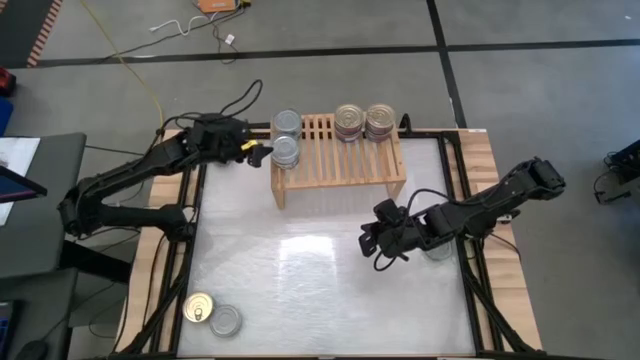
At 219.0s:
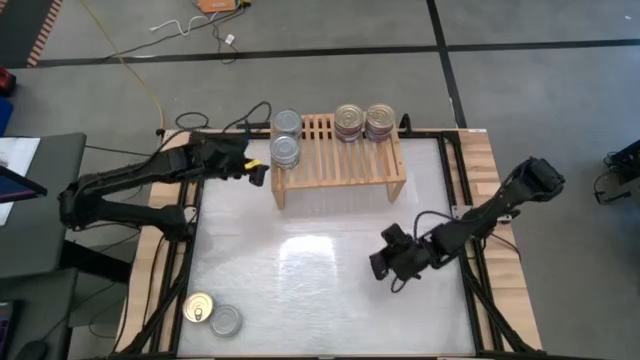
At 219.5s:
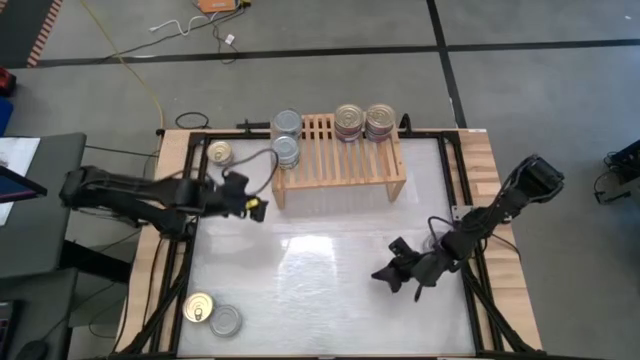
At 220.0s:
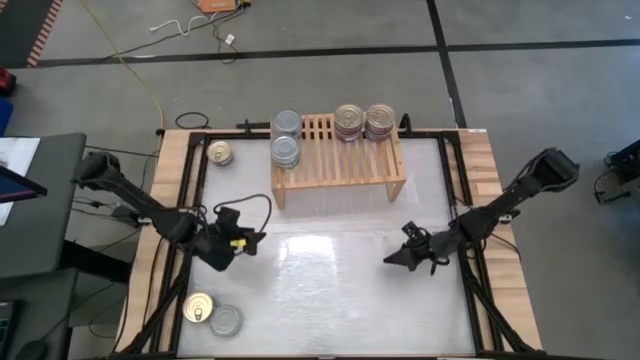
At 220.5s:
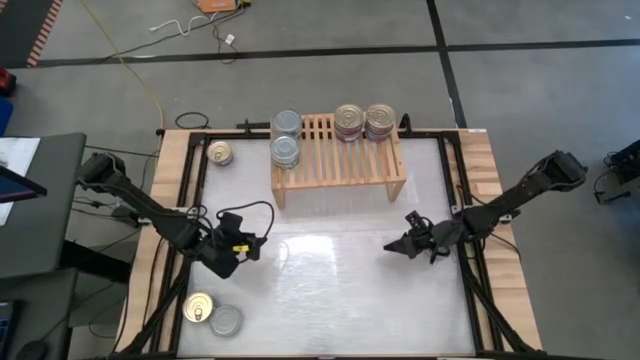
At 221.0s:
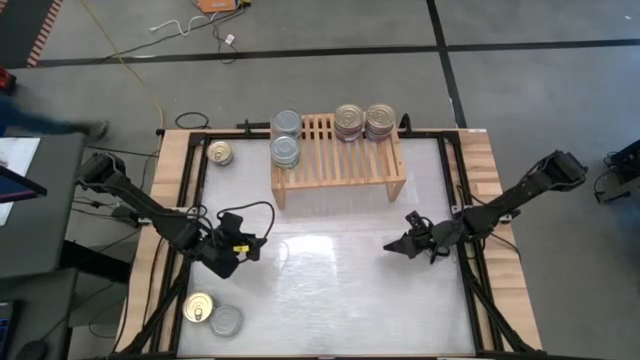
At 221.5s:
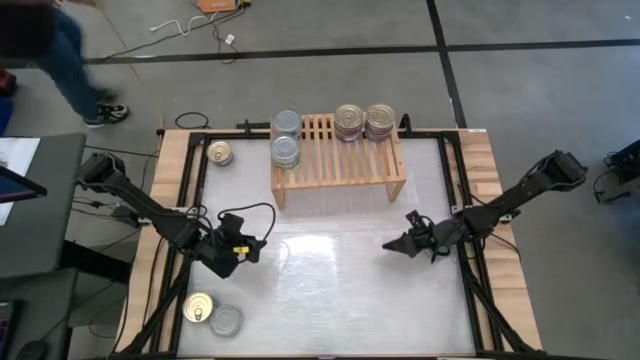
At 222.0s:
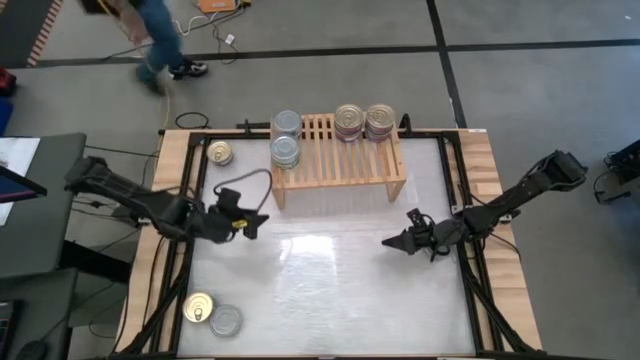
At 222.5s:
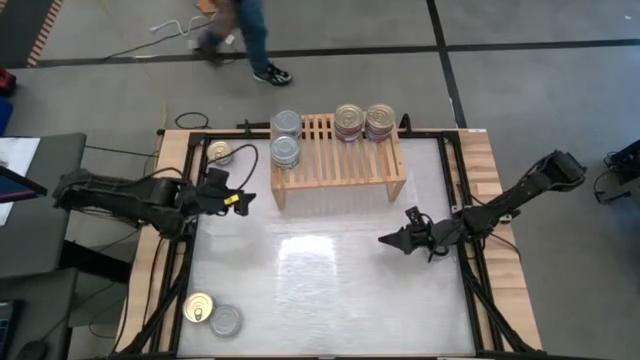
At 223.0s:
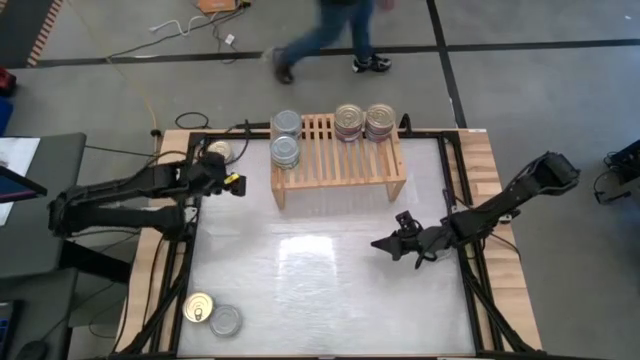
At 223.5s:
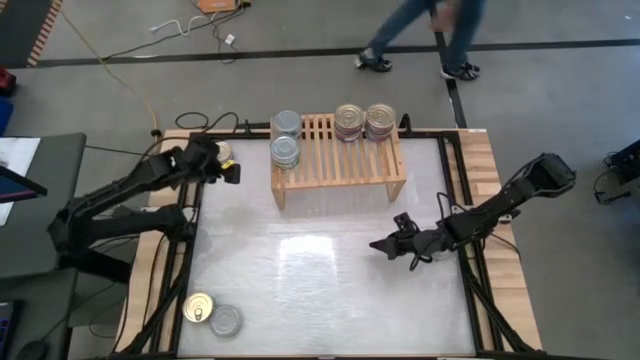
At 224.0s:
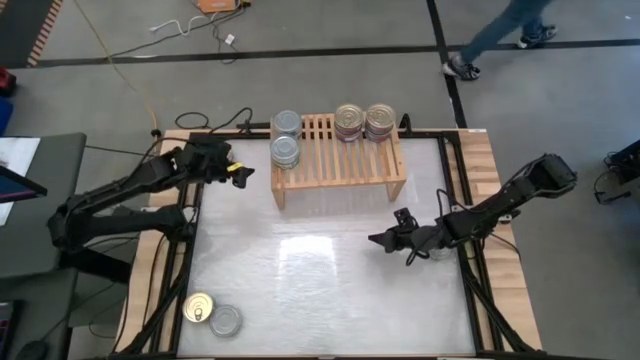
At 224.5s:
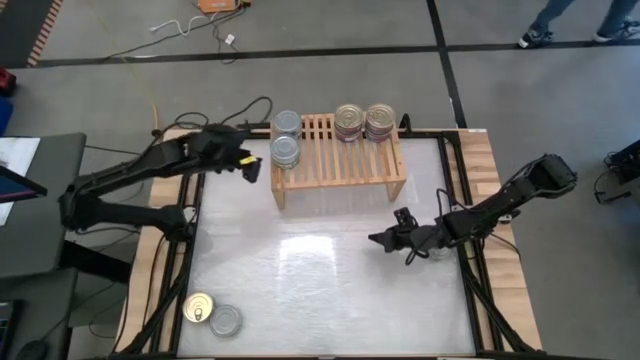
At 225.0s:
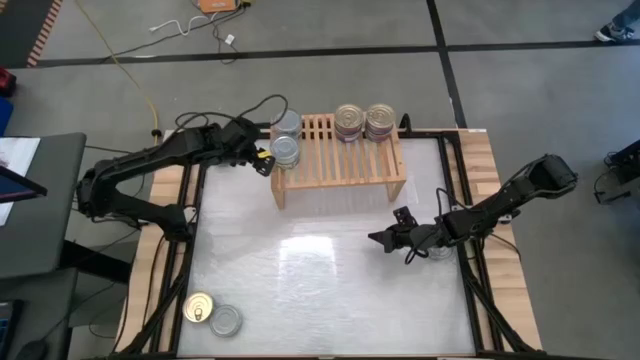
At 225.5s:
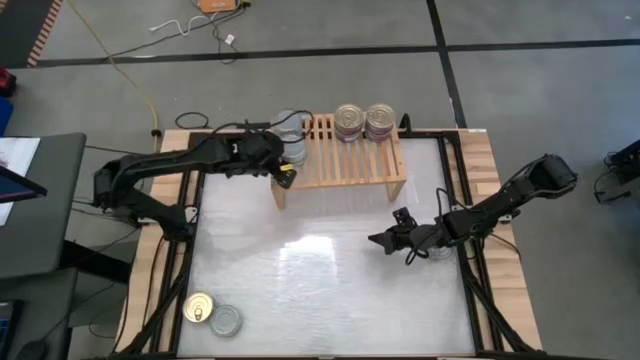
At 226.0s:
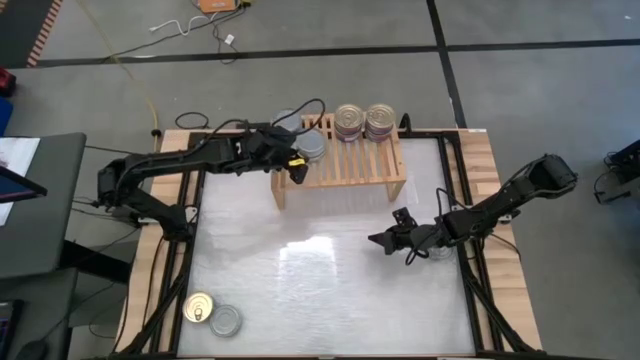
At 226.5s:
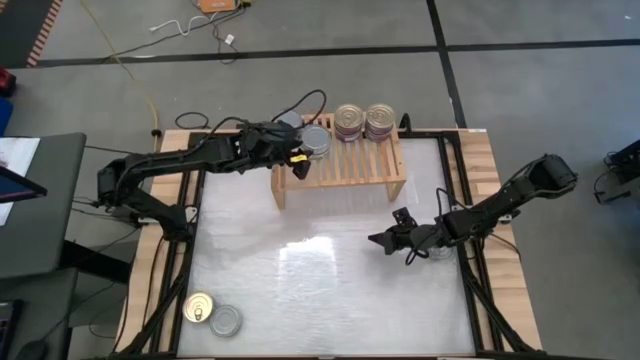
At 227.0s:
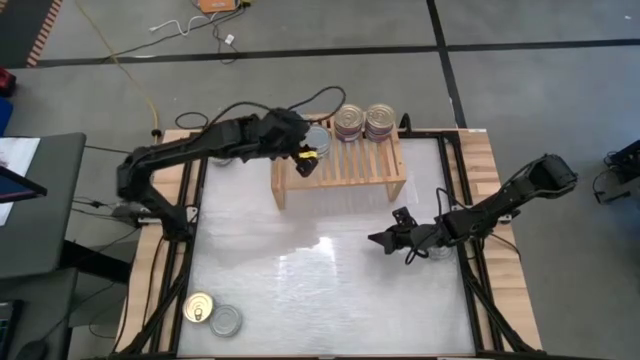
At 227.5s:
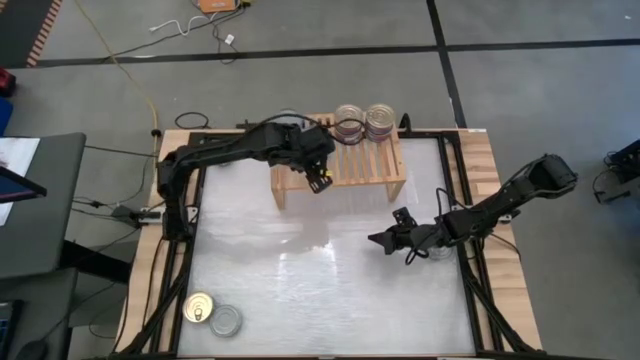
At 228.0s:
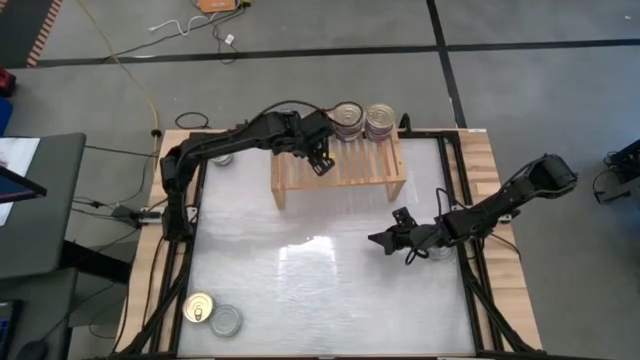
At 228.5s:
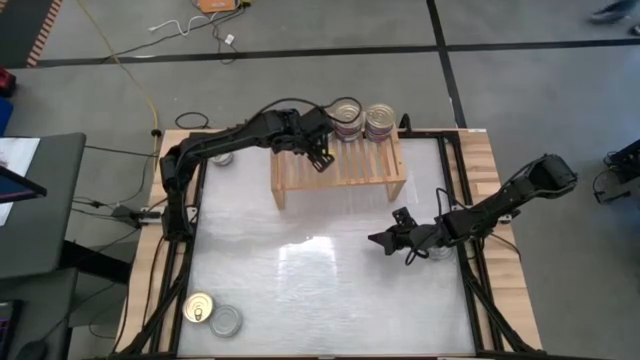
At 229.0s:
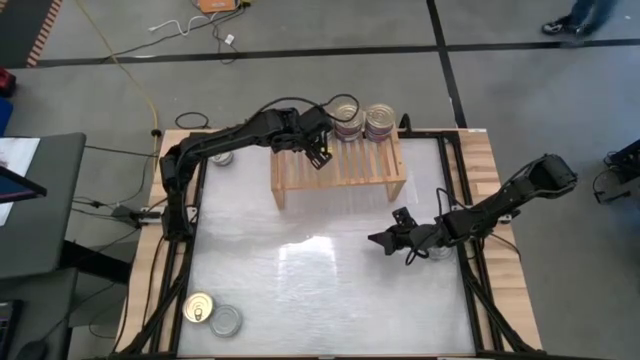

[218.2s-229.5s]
Task: Stack canned seafood by type on shelf
Adjust the green tuna cans

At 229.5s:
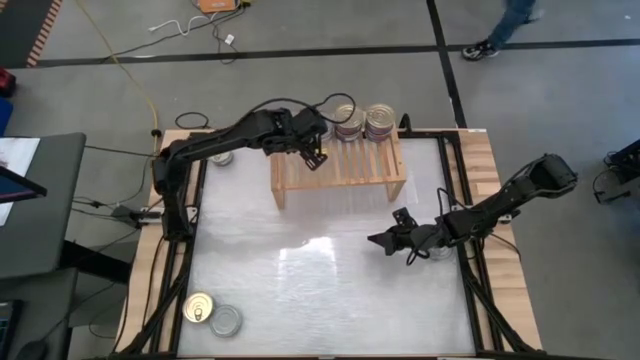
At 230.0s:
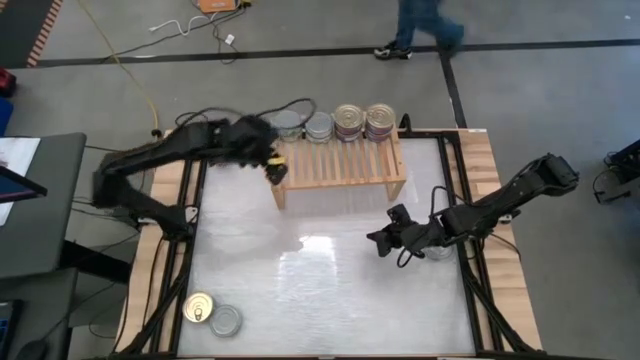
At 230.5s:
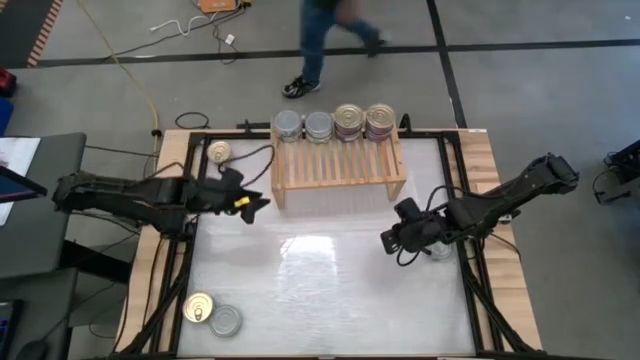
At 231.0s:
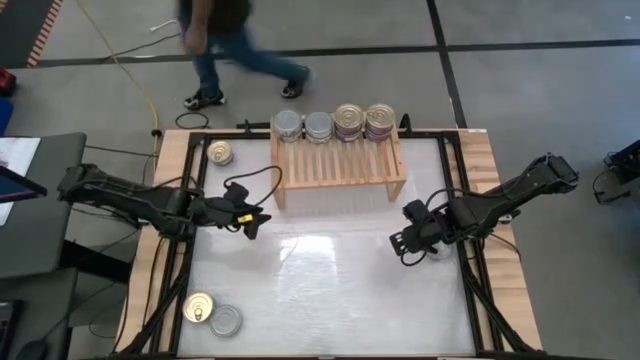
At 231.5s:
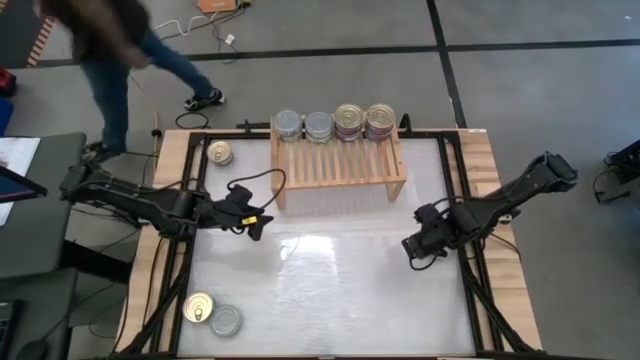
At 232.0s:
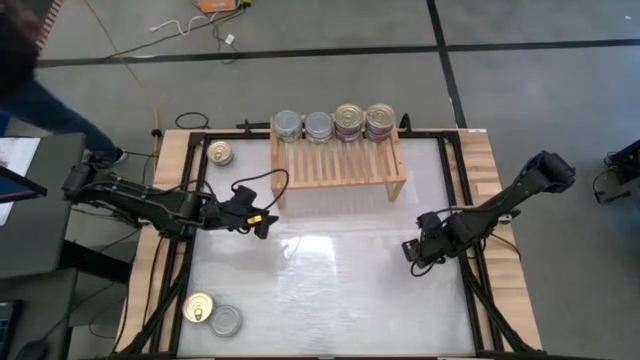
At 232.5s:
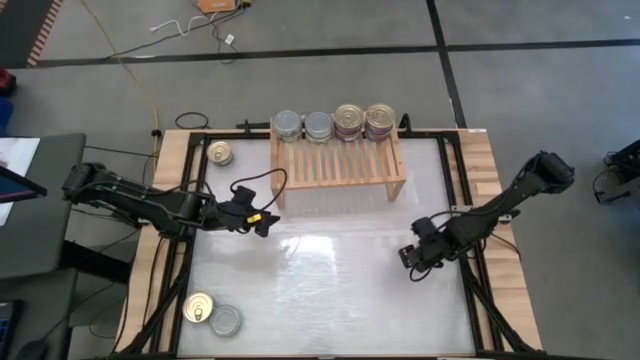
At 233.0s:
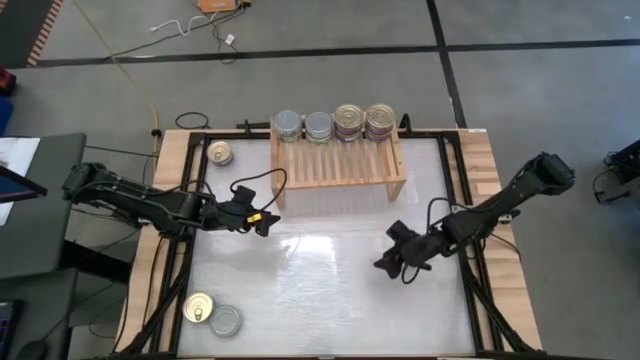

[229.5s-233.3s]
Move the green tuna can to the center of the table

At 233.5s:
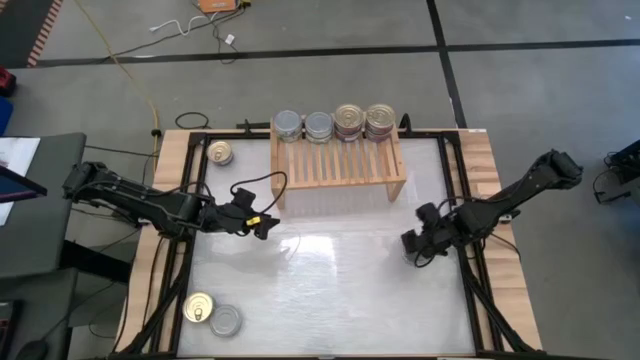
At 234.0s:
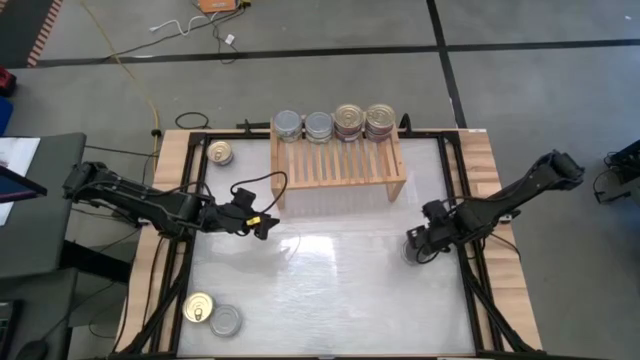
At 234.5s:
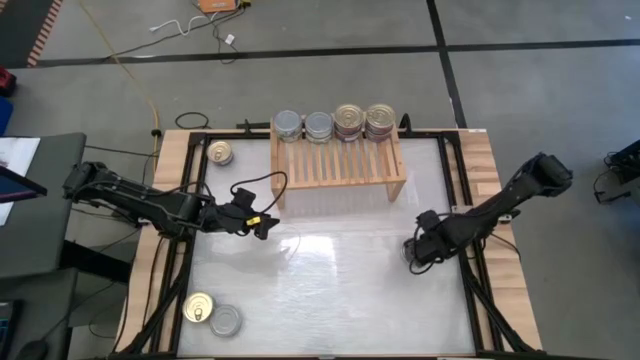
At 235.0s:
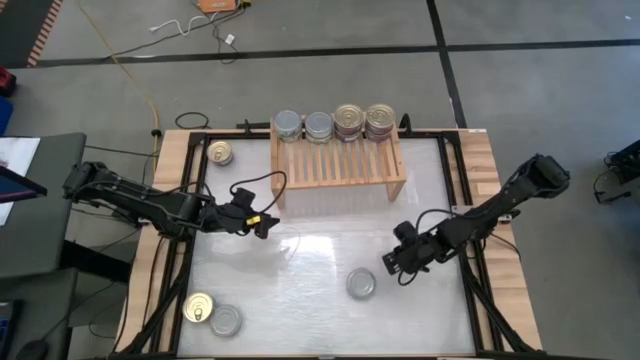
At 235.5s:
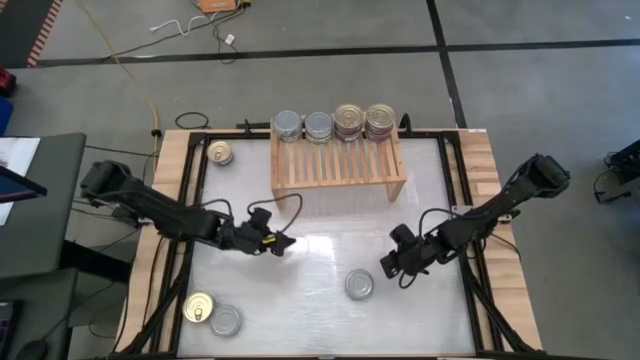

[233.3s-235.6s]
Move the green tuna can to the center of the table

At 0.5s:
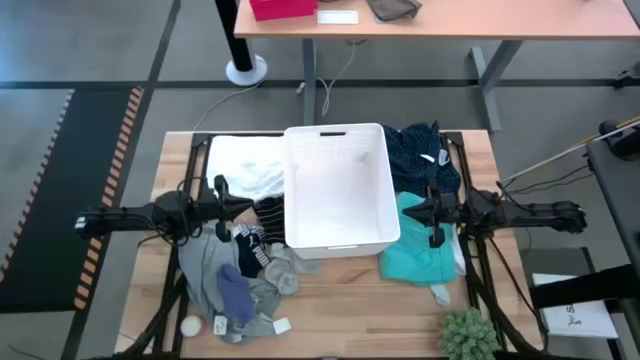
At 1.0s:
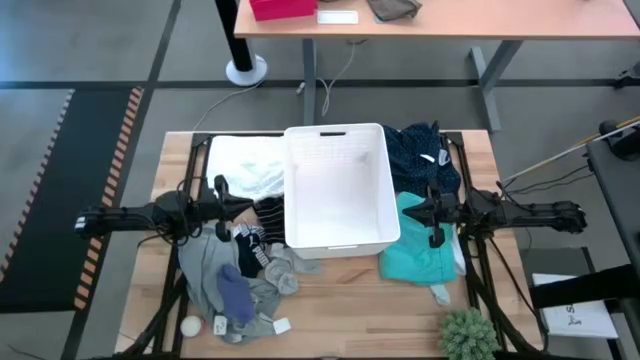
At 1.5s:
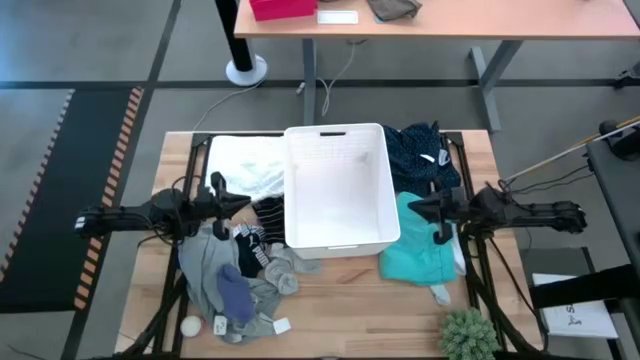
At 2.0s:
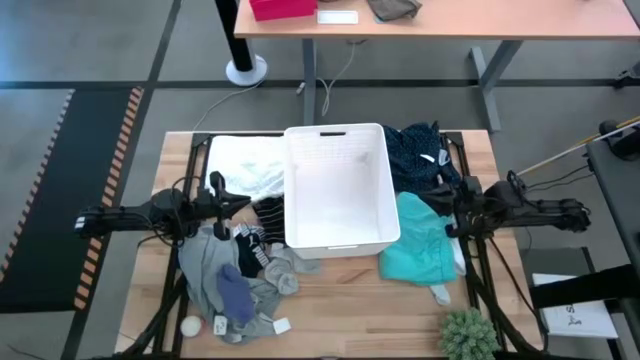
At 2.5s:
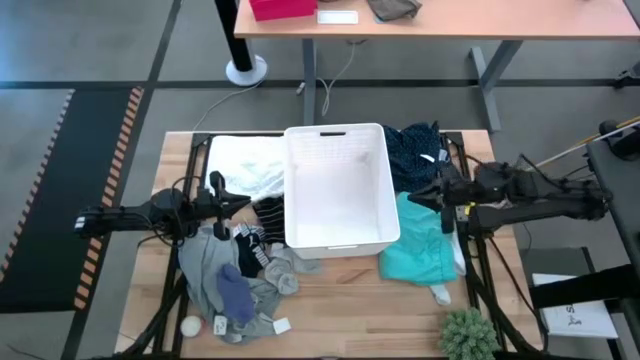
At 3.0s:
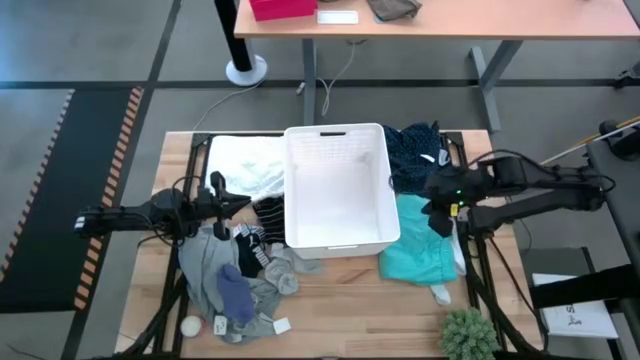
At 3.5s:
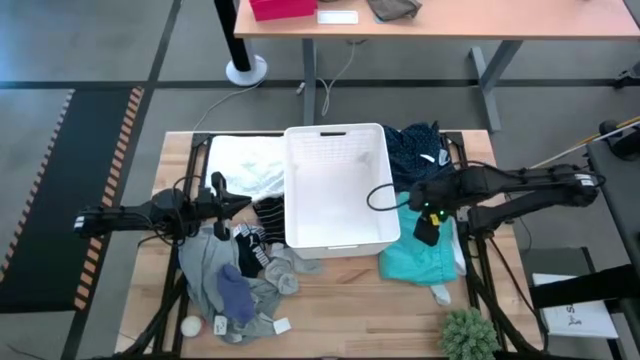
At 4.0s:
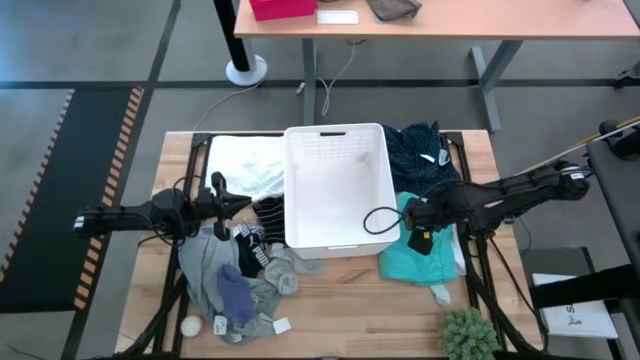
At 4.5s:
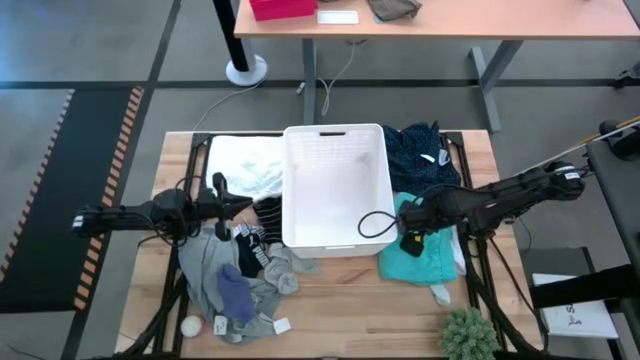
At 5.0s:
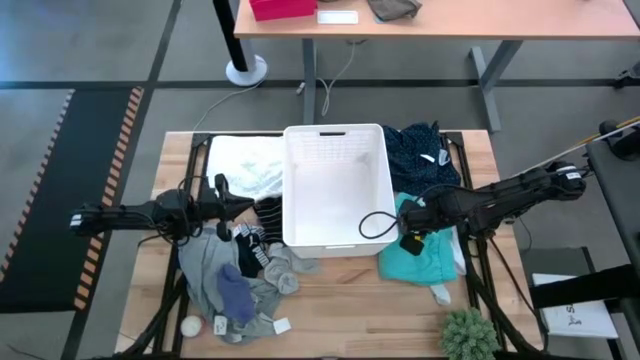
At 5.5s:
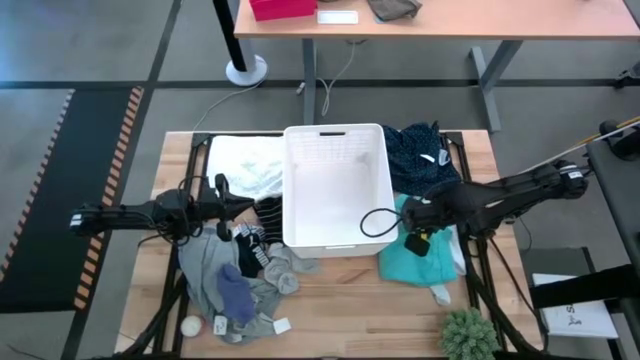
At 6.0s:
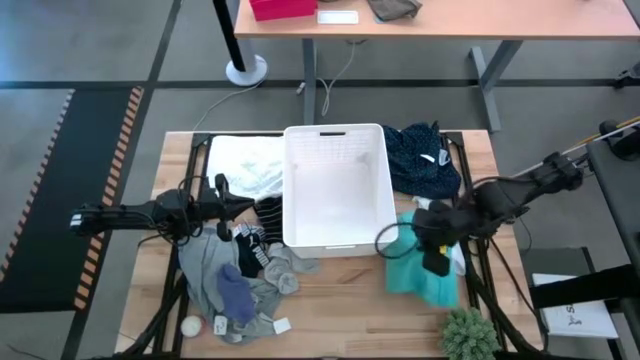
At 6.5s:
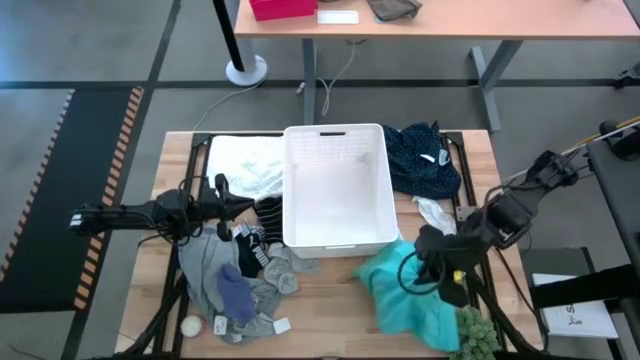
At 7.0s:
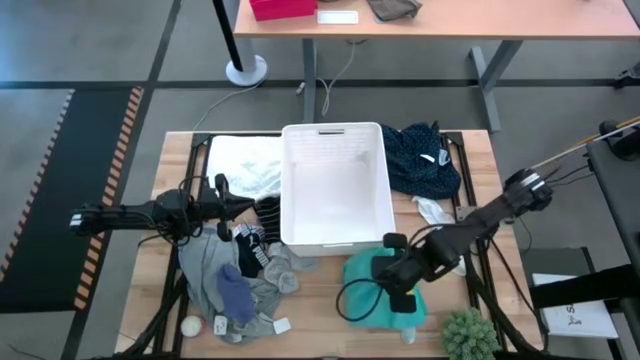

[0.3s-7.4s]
Task: Sort clothes
Move the light blue shorts to the bottom center of the table
